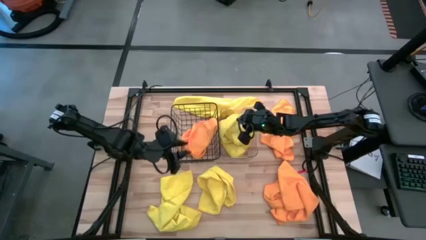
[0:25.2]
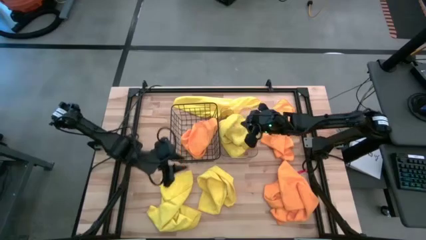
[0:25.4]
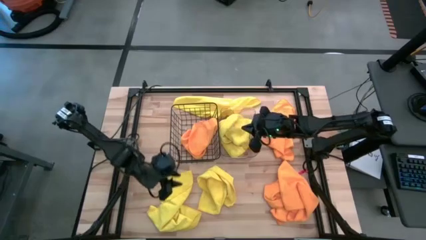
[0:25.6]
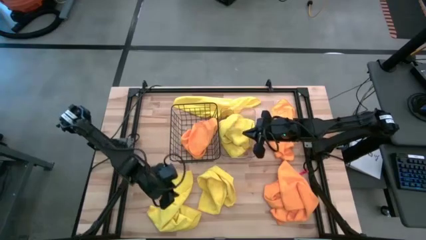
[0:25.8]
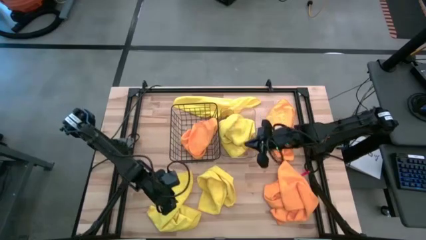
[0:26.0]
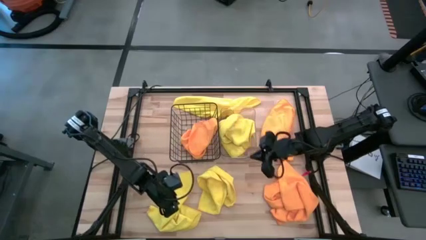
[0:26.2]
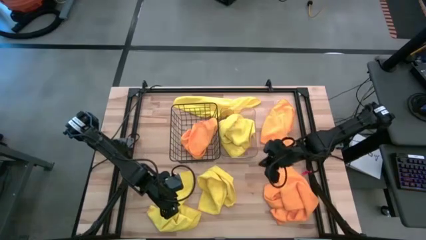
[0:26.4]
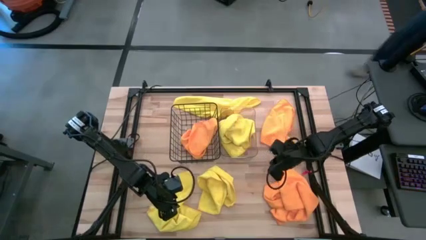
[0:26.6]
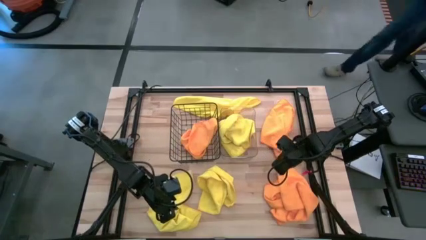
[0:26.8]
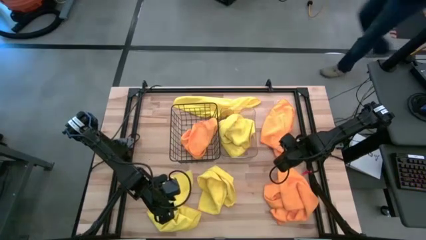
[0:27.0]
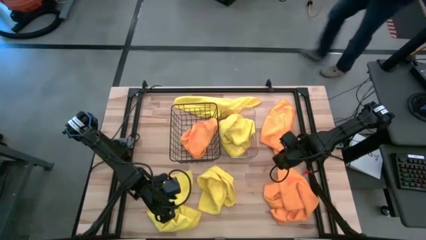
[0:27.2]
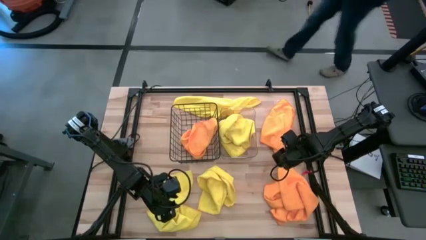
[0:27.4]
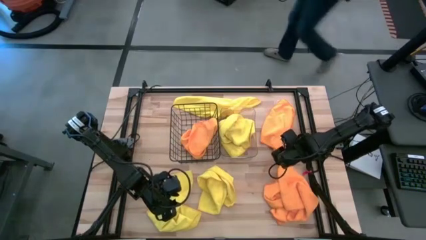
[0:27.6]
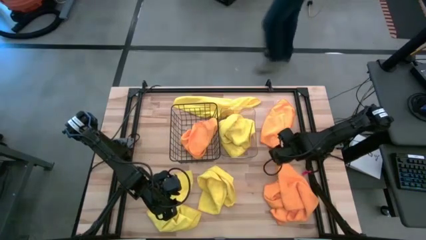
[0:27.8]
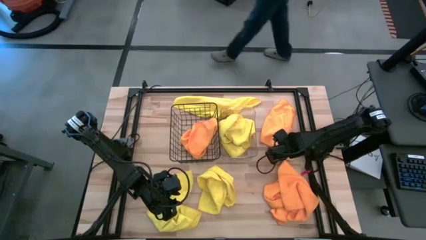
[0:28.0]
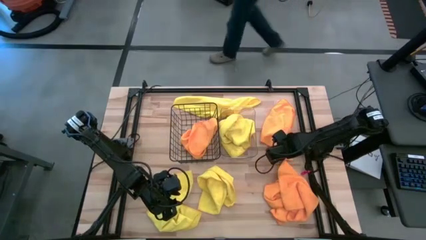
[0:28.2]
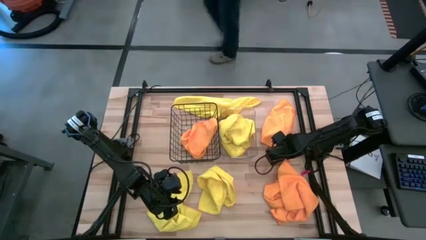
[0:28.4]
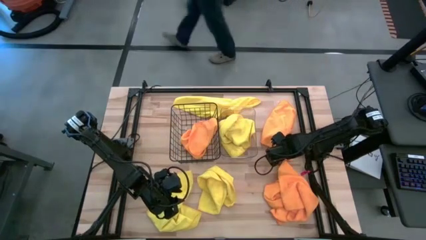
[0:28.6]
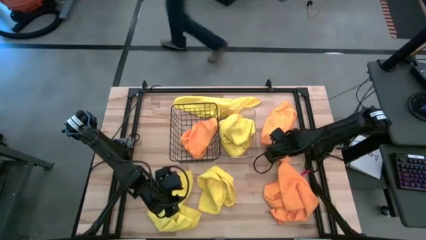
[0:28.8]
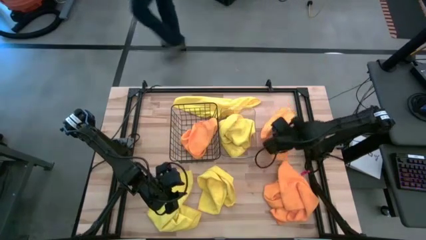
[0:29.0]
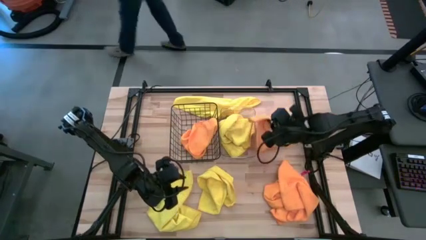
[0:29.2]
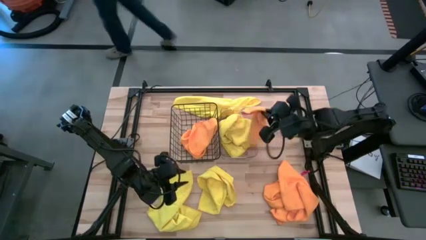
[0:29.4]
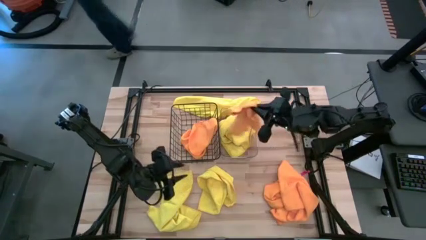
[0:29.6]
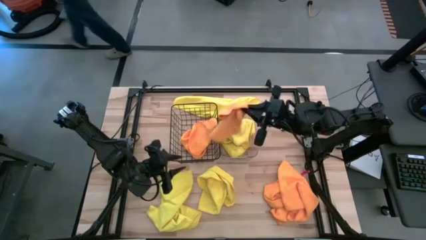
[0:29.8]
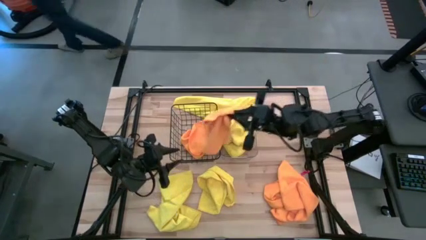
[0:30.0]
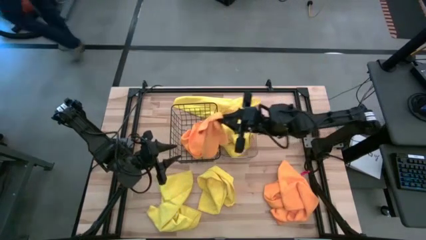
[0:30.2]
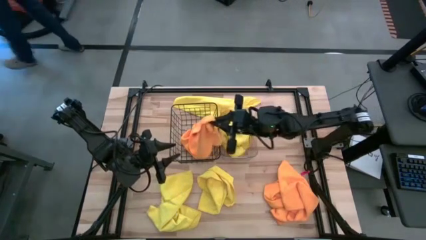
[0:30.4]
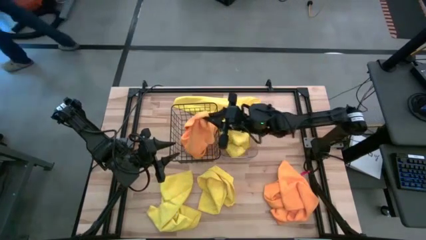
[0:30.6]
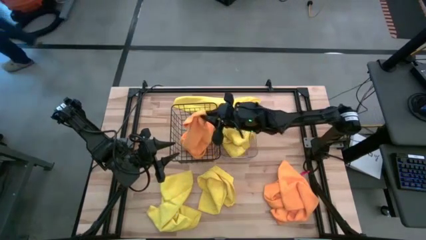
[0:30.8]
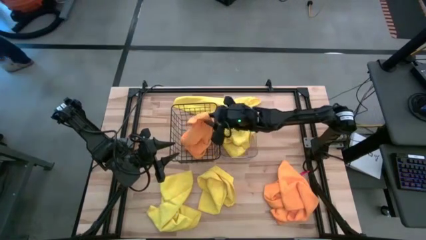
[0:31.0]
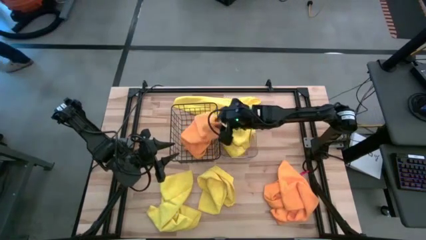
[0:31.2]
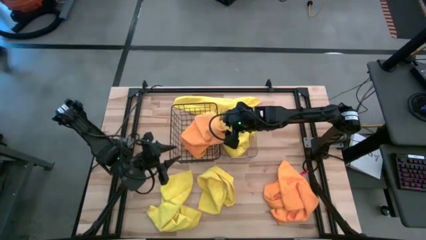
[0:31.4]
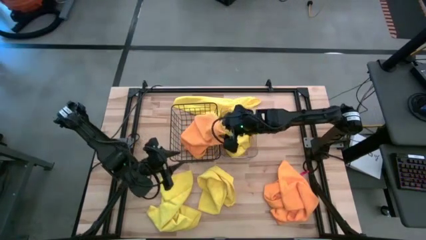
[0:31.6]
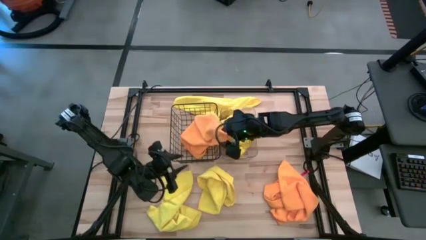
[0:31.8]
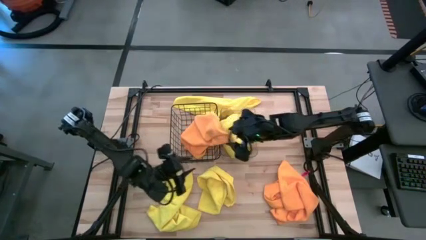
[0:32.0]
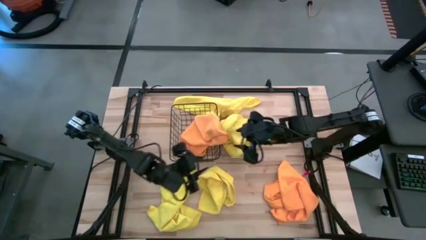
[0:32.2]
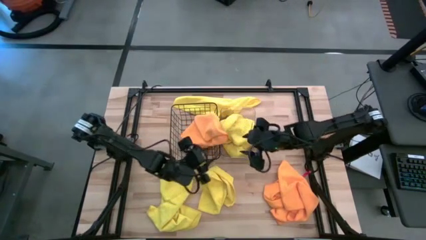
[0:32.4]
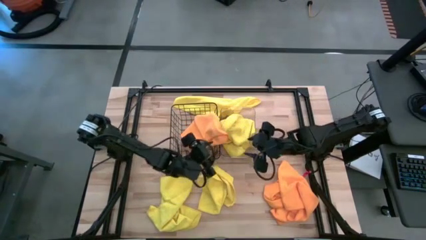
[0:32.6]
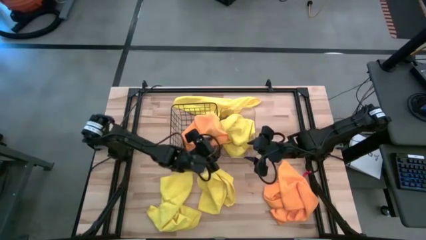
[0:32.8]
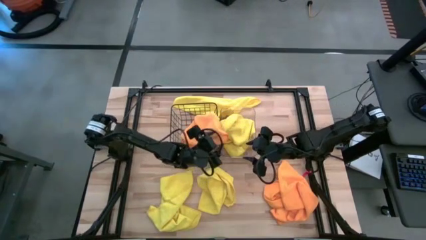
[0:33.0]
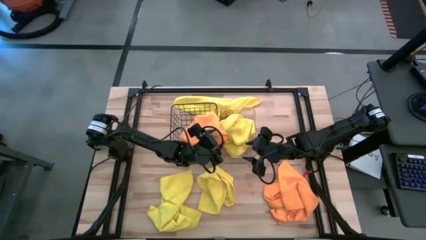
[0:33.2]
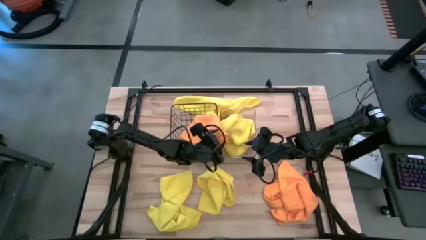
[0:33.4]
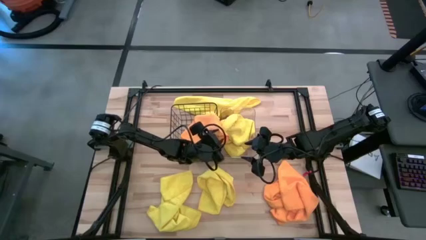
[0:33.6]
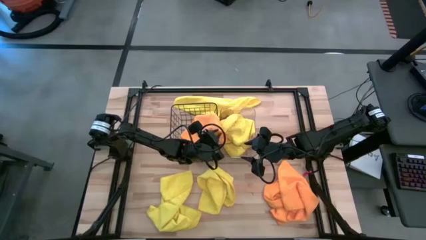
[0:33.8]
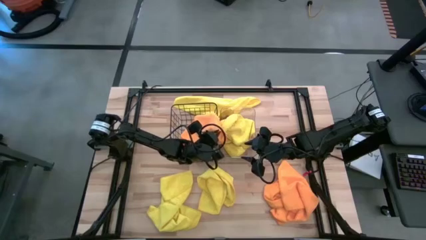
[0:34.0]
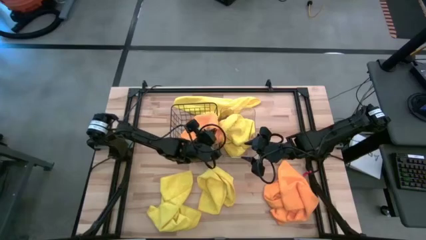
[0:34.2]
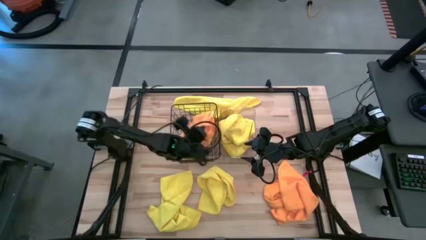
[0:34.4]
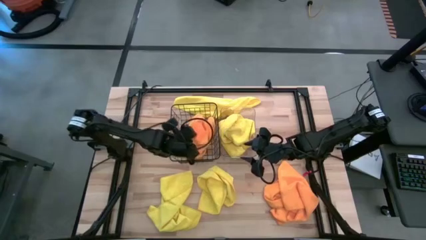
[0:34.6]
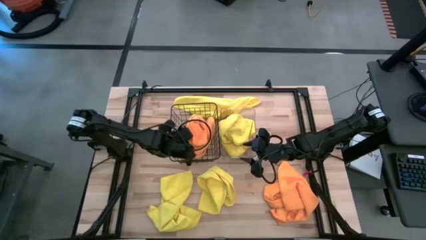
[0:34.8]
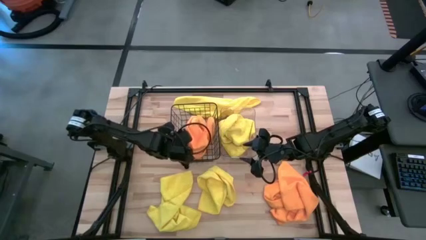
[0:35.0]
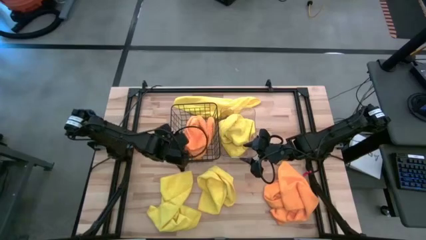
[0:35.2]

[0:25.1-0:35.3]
Task: Sort microfiber towel by color & place in baskets
Put the orange microfiber towel into the wire basket

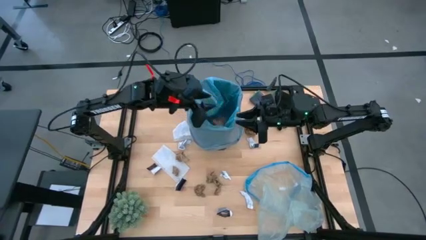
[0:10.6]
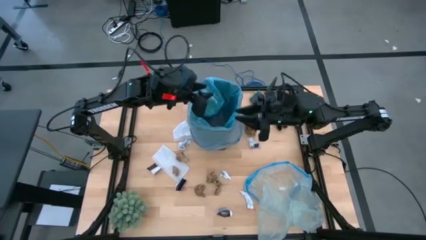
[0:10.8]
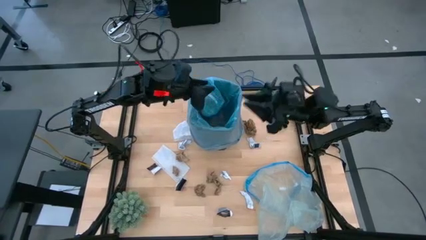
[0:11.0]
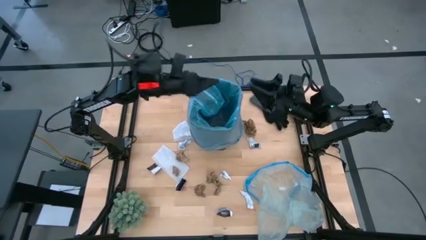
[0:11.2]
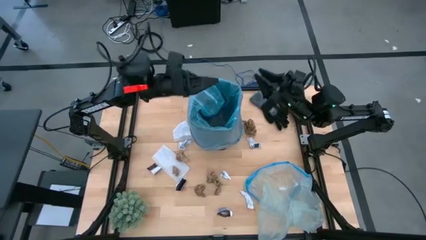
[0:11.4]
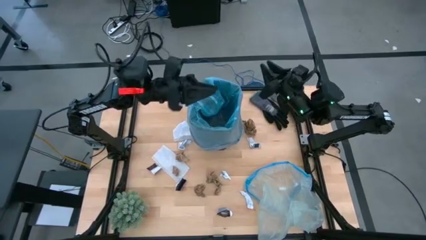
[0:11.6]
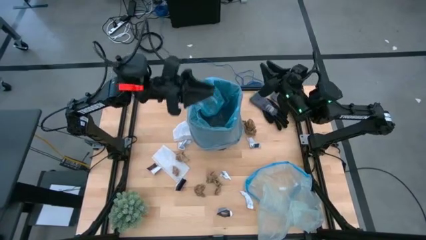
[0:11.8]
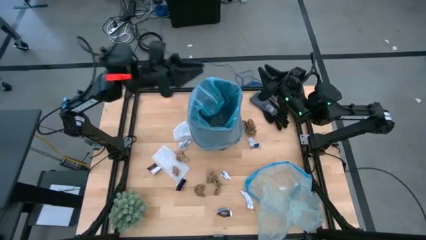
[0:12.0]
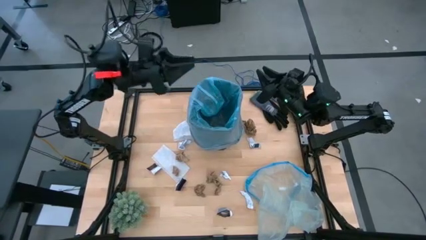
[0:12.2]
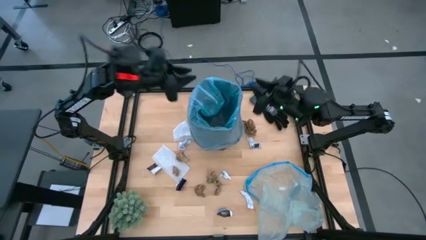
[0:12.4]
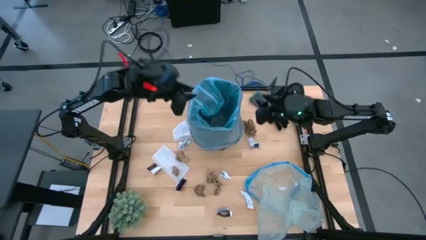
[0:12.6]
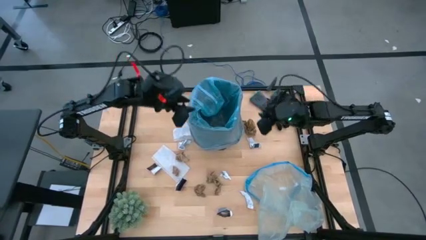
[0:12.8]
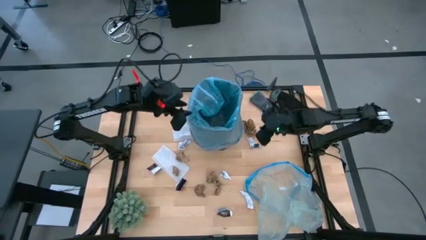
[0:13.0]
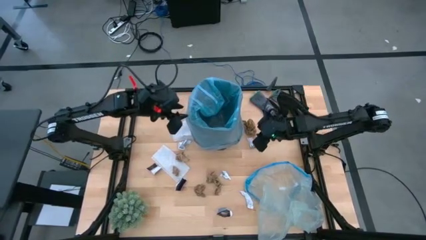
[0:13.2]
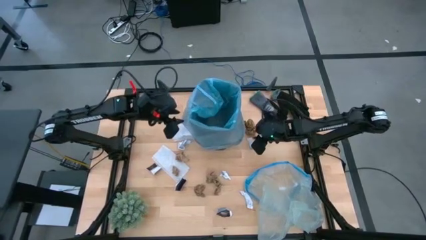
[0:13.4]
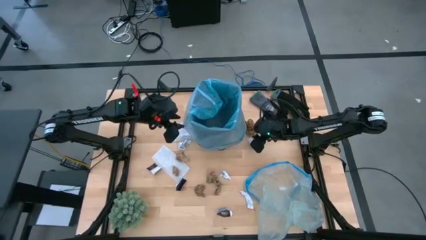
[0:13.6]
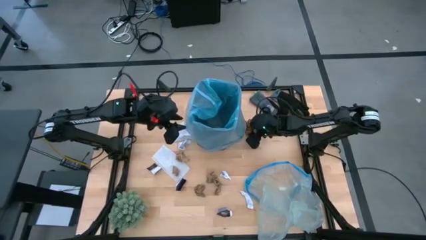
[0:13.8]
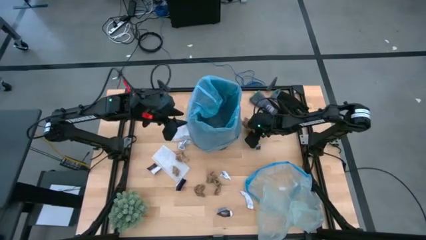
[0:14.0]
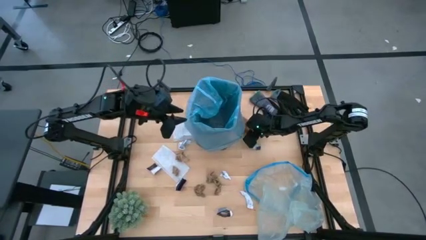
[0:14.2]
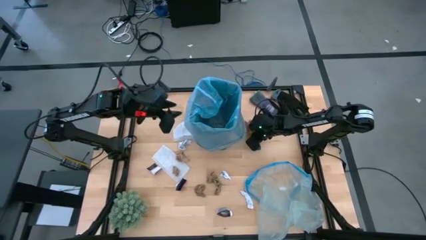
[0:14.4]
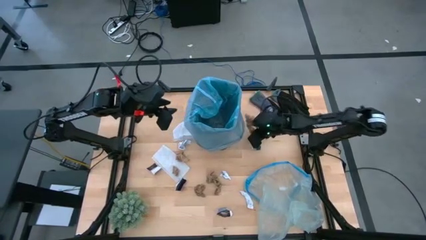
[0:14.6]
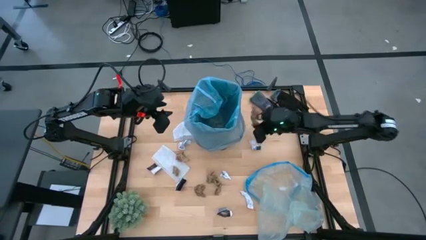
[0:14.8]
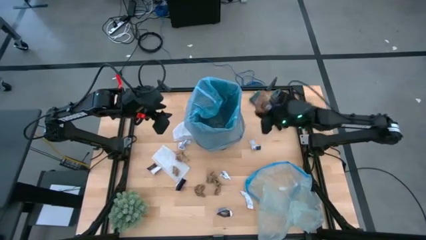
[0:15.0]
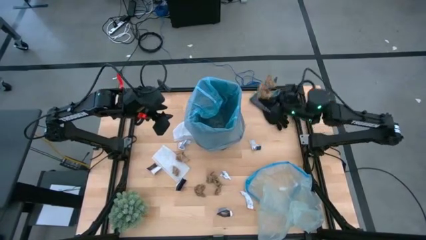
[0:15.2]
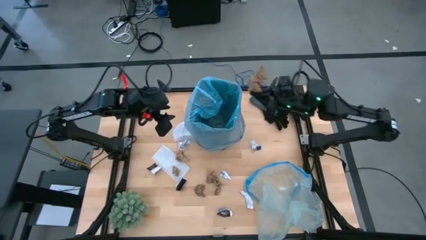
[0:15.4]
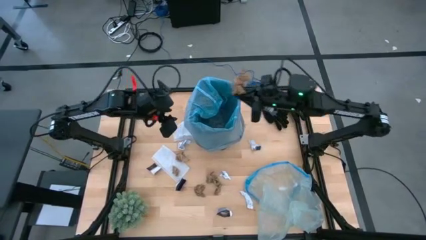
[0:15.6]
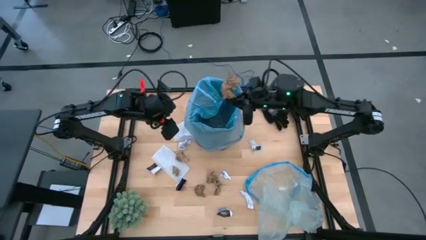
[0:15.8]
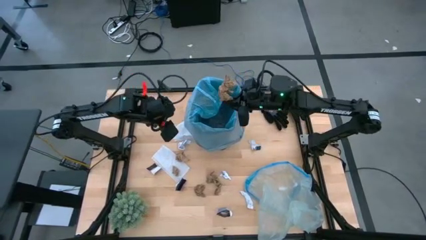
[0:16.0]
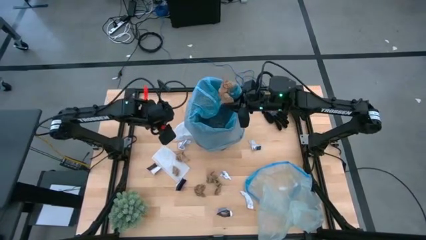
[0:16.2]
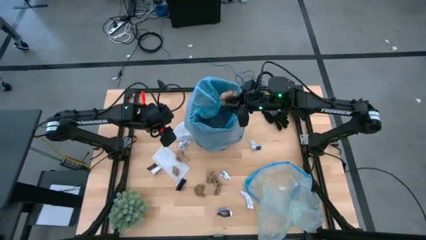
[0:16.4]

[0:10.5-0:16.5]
Task: place trash/remove bag and relplace
Put the brown napkin into the trash bin
